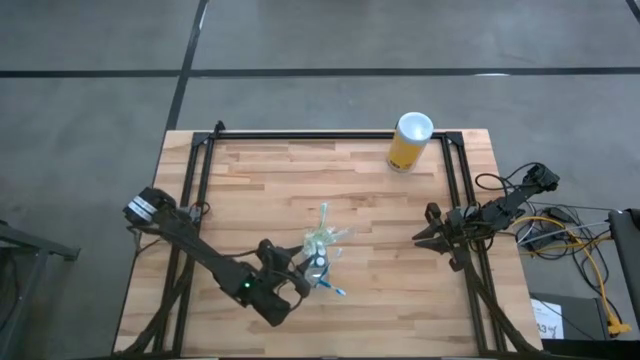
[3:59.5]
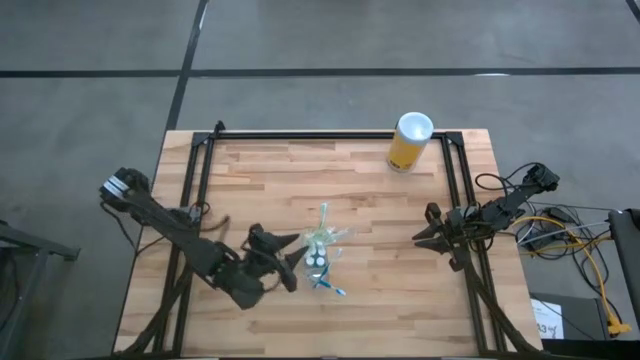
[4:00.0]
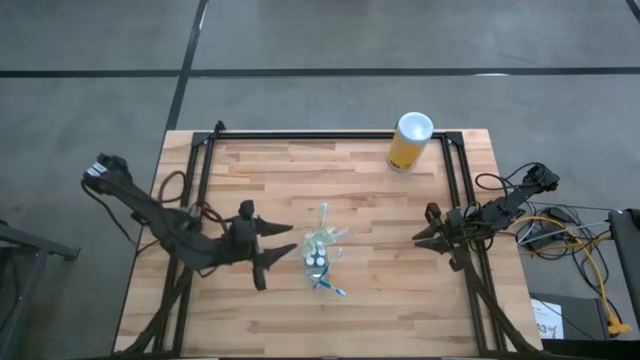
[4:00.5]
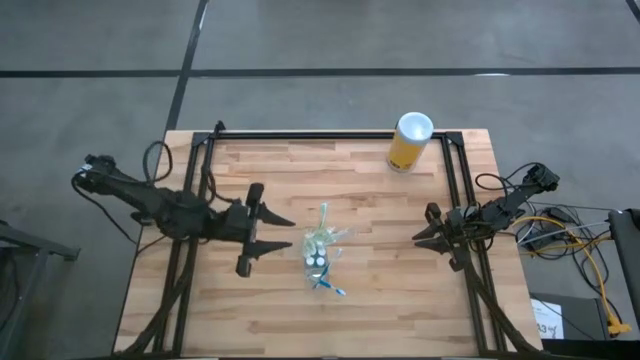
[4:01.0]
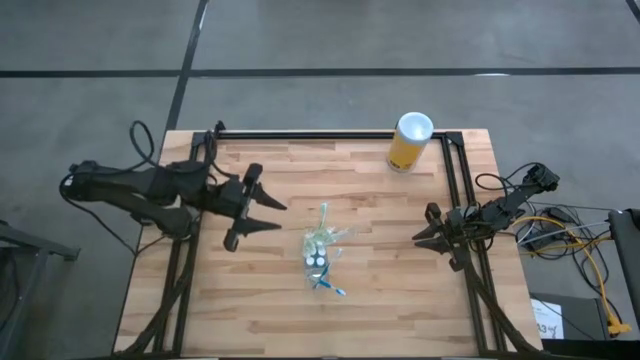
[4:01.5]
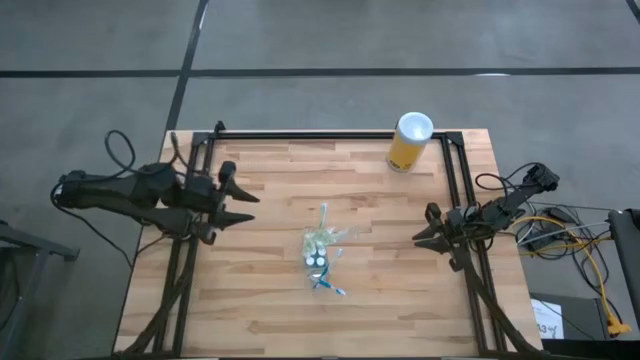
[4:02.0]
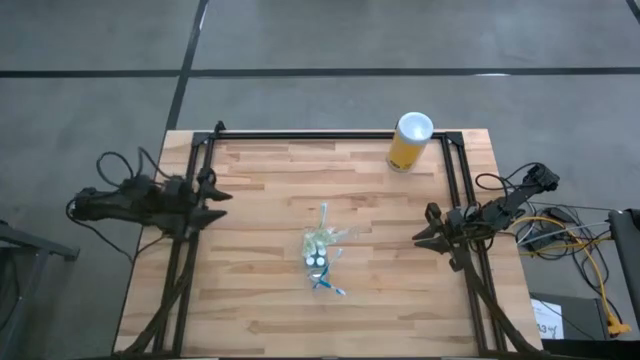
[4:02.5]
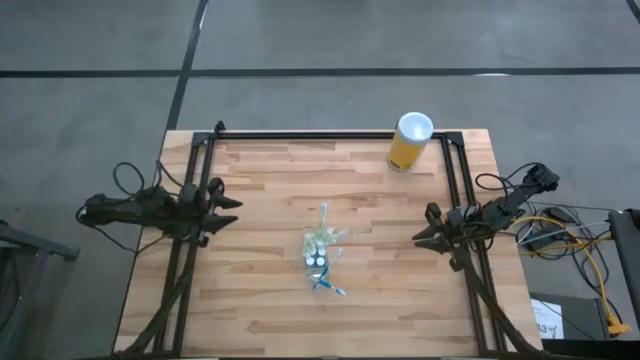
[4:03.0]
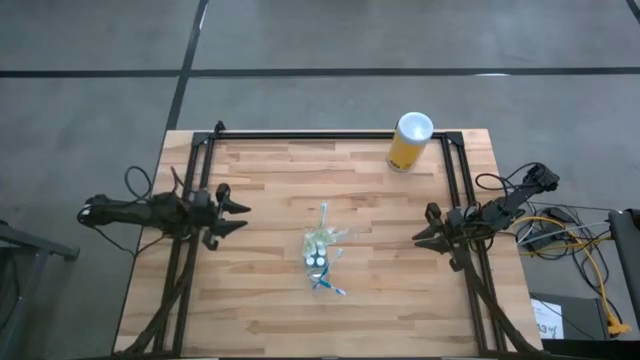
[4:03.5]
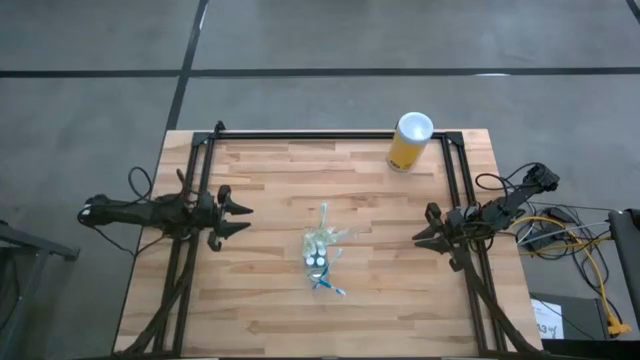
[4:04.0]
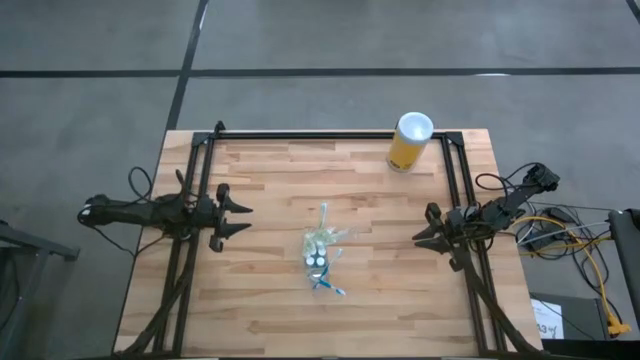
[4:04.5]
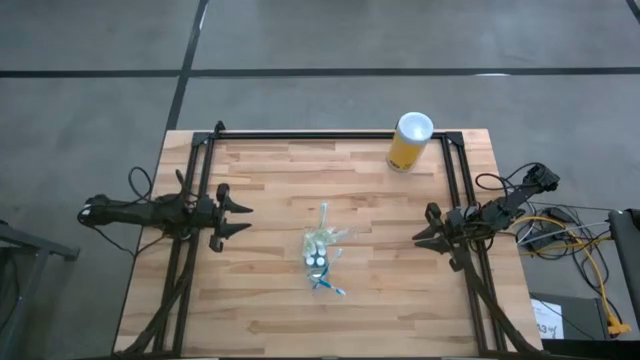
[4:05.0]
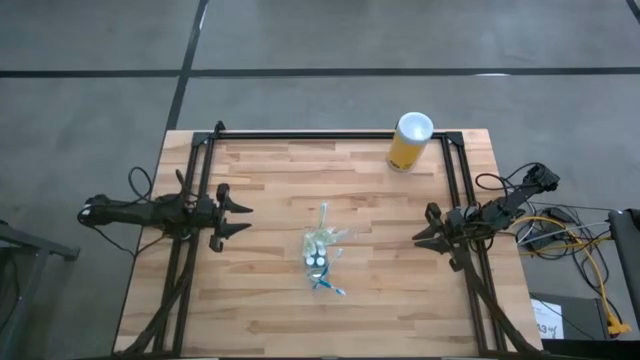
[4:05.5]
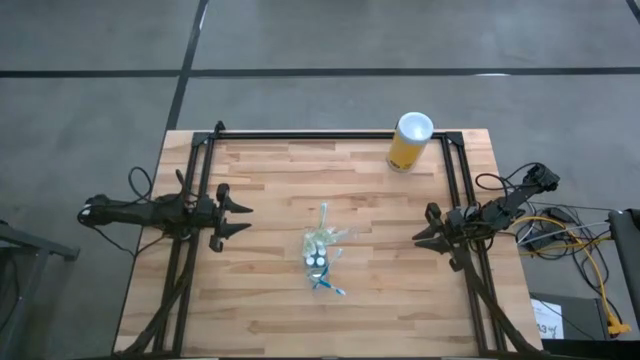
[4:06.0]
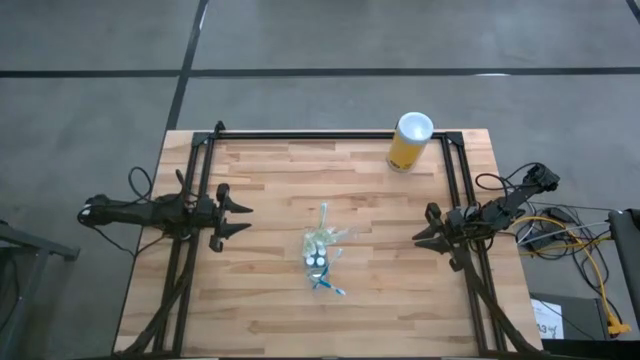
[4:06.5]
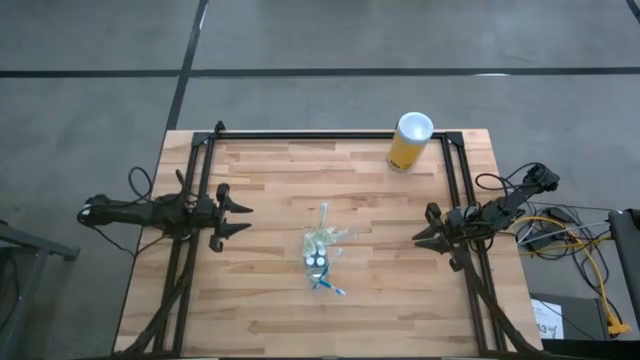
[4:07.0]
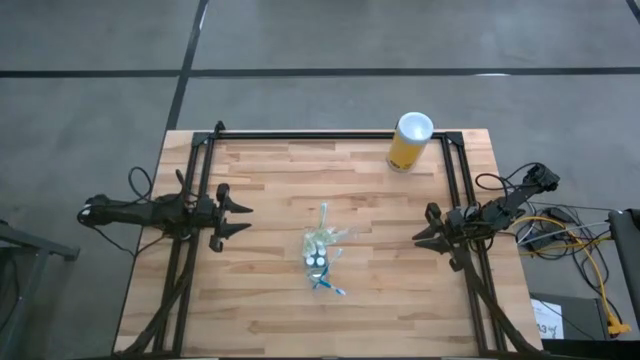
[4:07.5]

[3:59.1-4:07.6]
Task: Pick & Place toothbrushing station
Return to Home Position

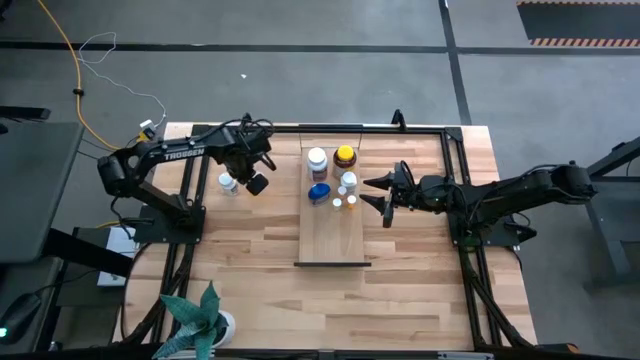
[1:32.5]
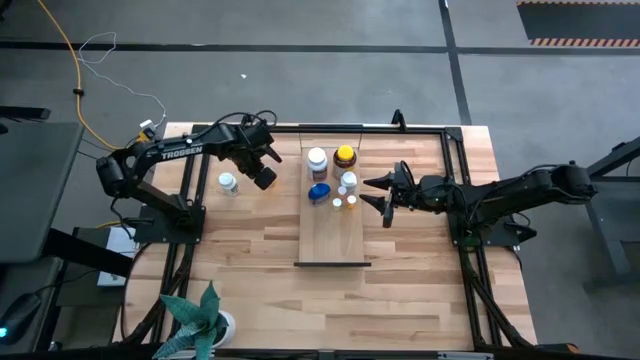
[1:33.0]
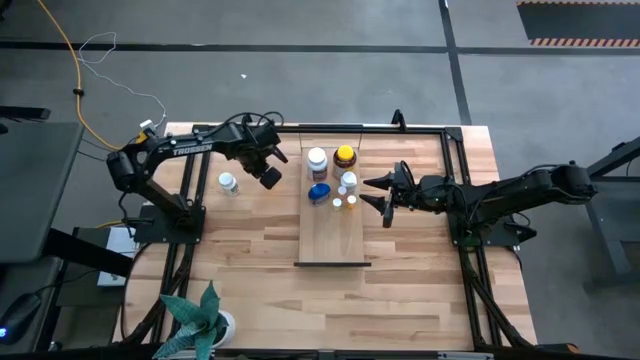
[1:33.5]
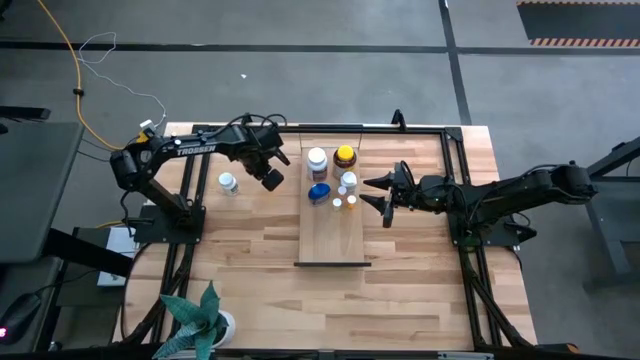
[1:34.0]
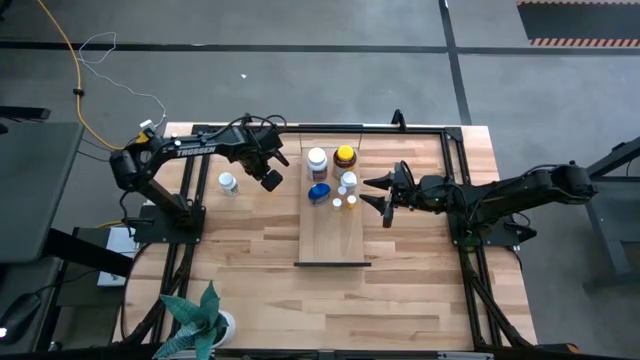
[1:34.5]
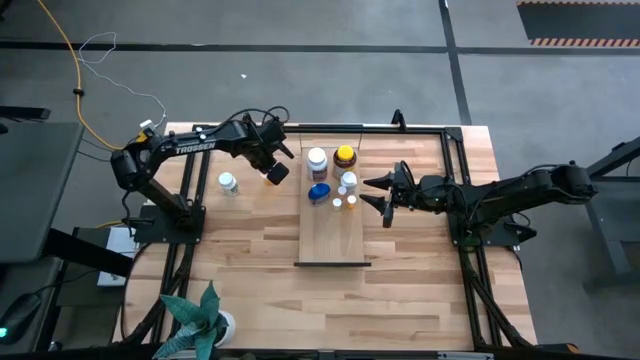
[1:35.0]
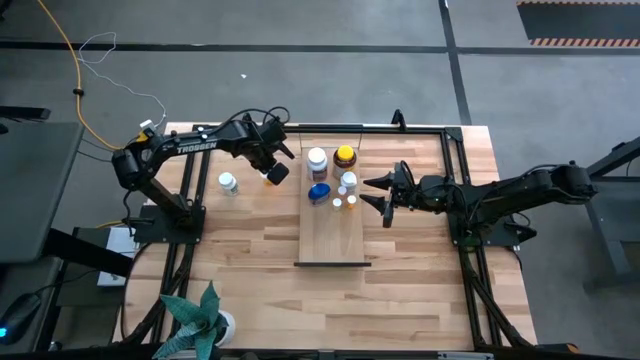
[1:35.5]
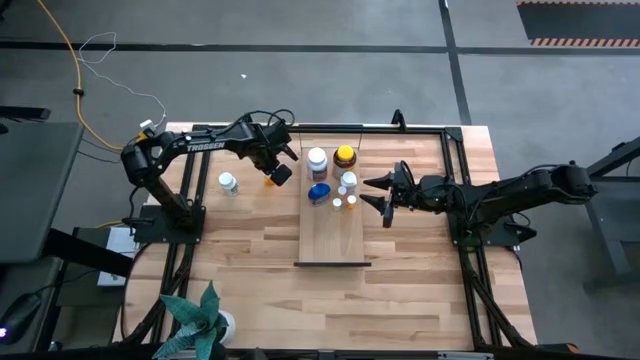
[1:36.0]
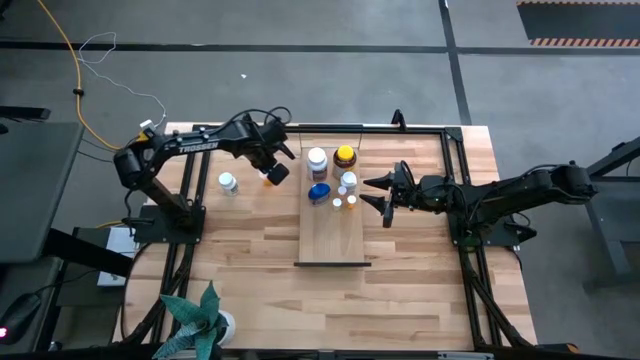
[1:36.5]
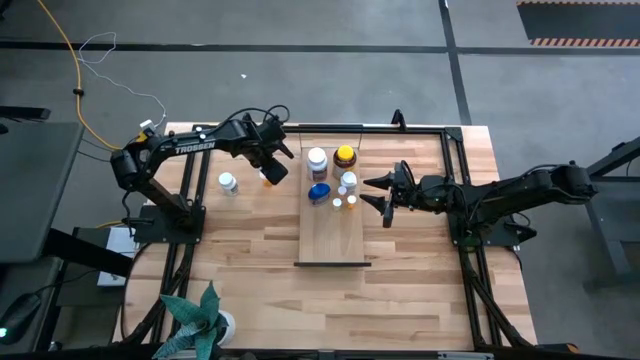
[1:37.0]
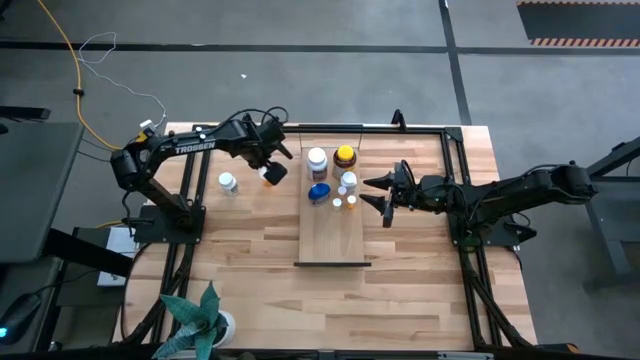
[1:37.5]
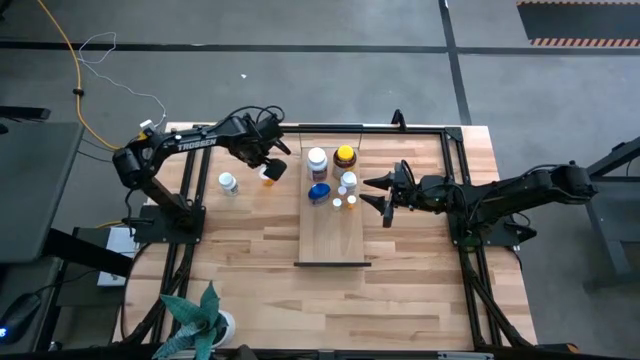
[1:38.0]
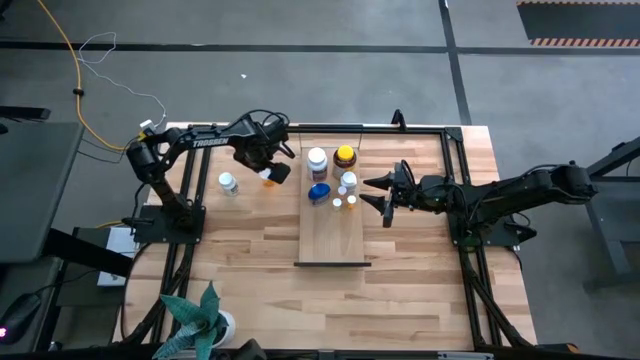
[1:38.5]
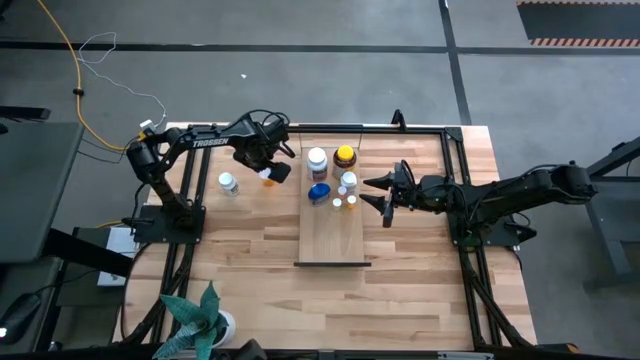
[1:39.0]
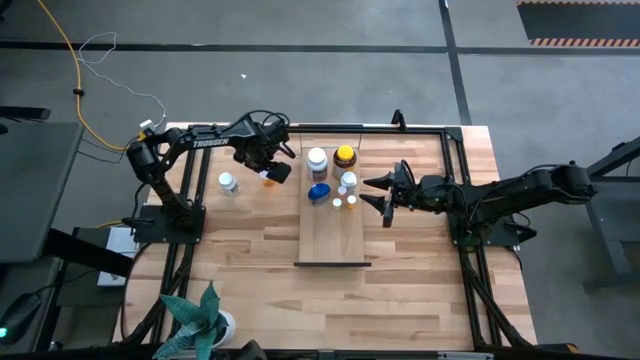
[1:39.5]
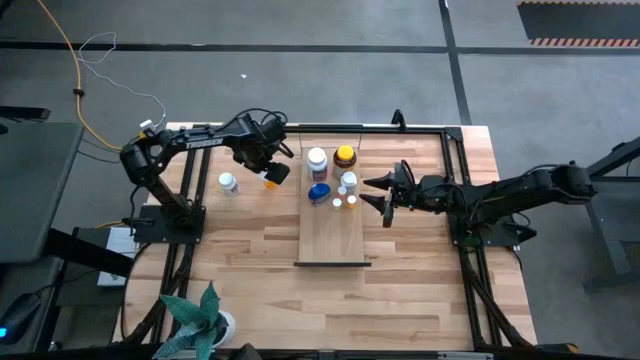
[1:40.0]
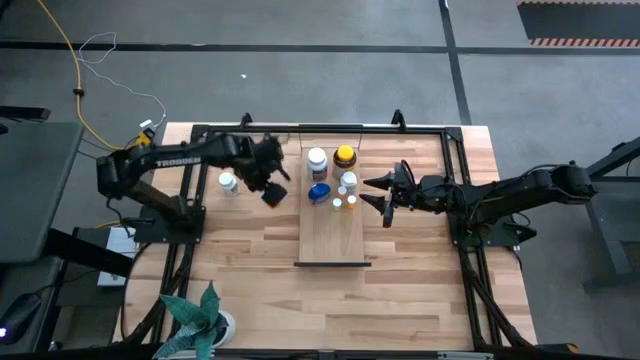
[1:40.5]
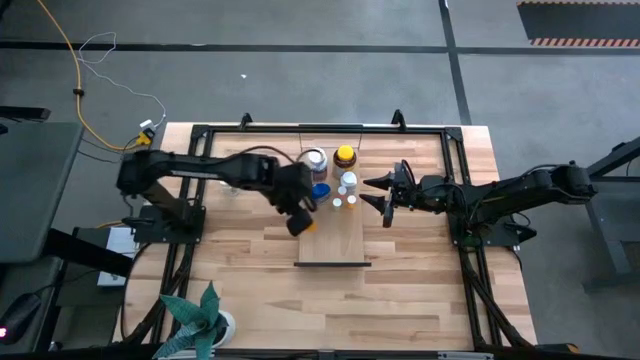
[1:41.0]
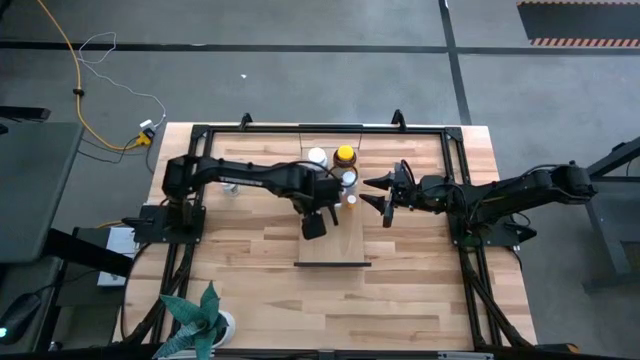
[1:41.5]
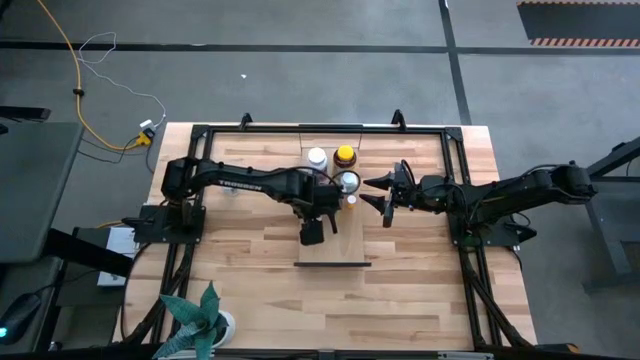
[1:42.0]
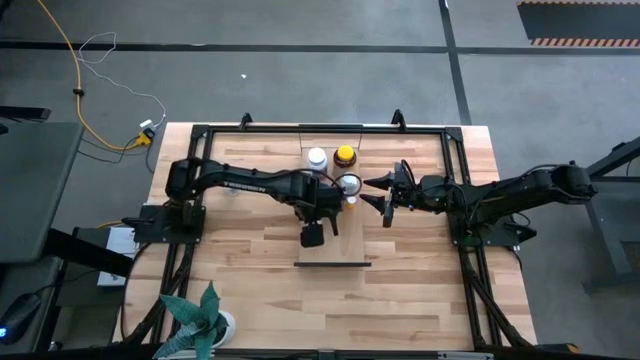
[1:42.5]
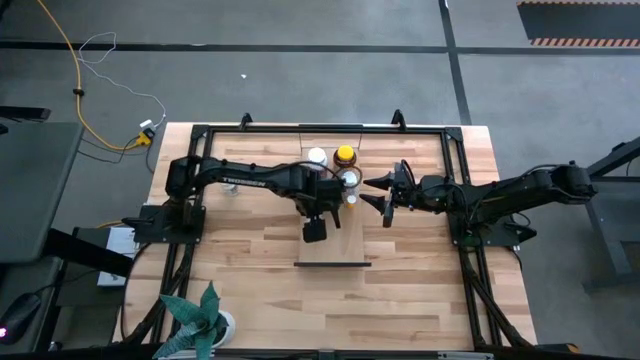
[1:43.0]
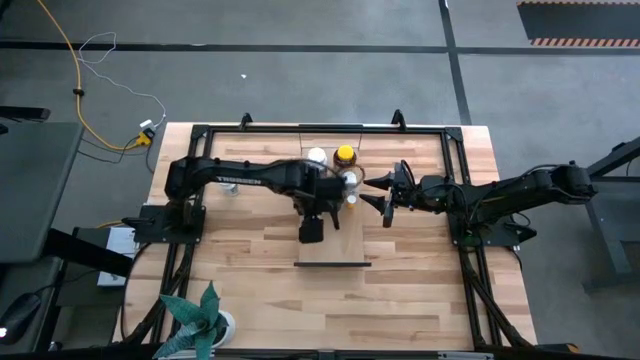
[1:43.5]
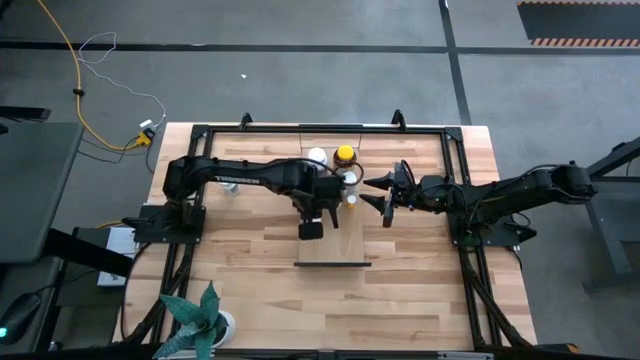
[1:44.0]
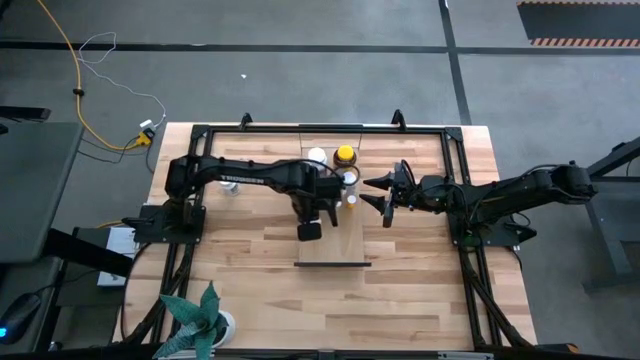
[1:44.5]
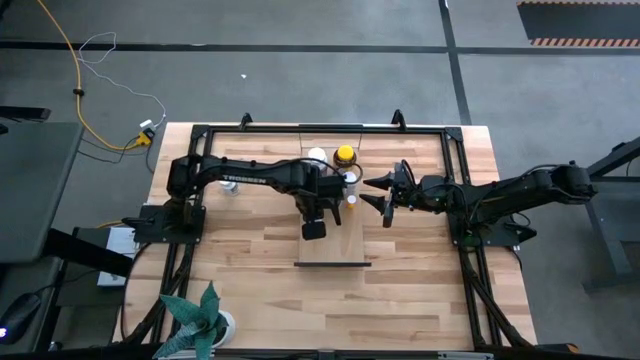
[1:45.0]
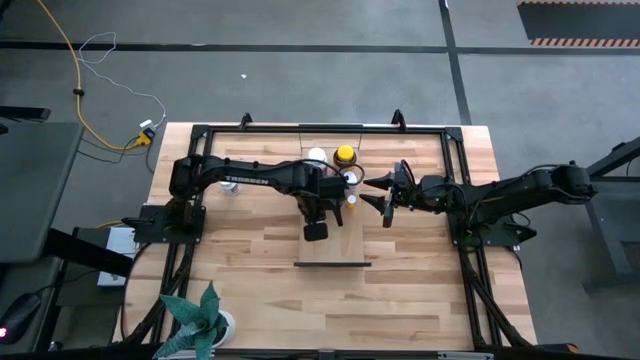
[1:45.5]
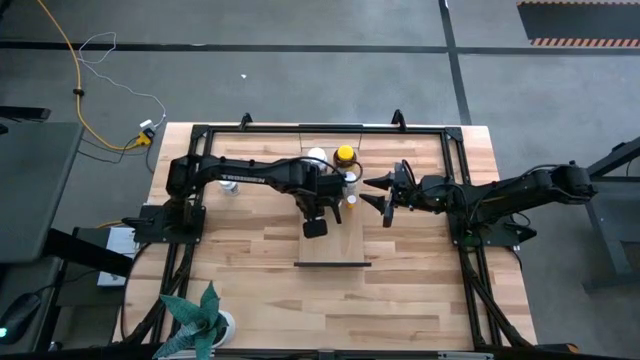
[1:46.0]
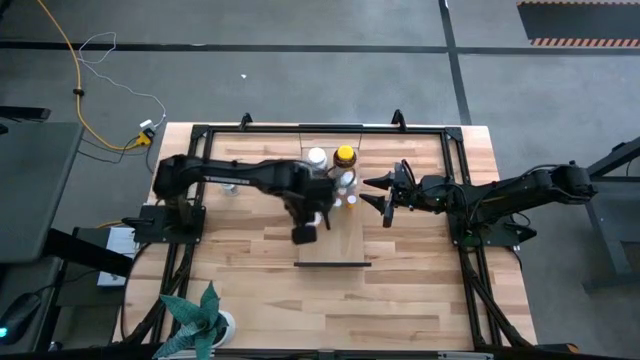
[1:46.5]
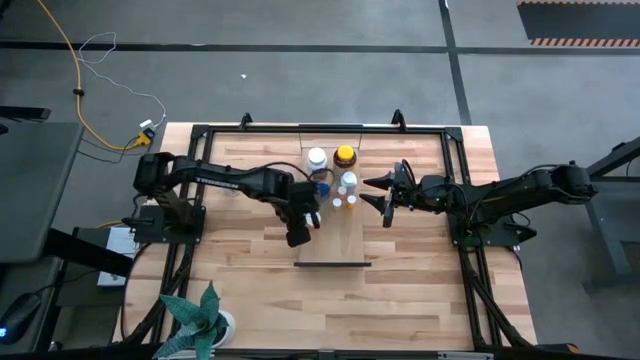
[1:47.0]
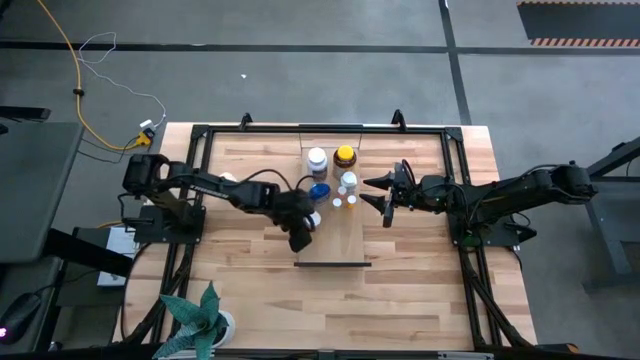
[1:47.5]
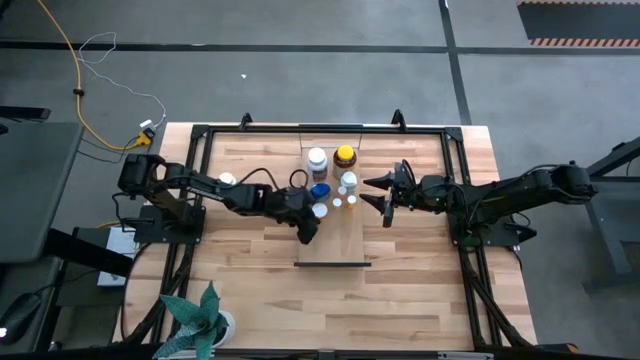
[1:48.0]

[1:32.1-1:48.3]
Task: Pick and place medicine bottles onto shelf by color
Put the medium orange pill bottle on the shelf
